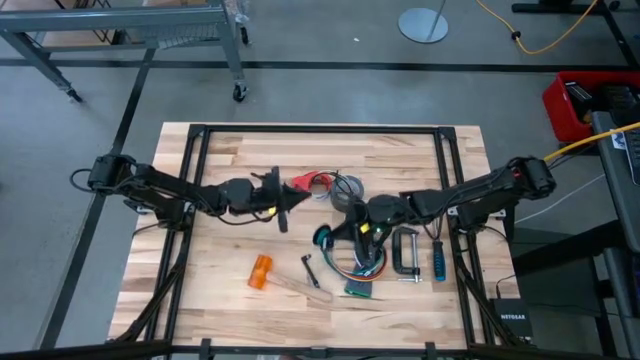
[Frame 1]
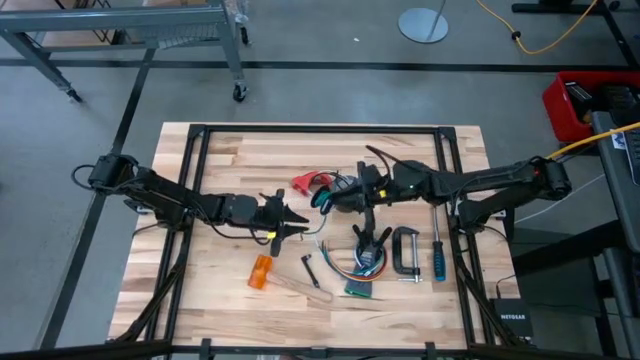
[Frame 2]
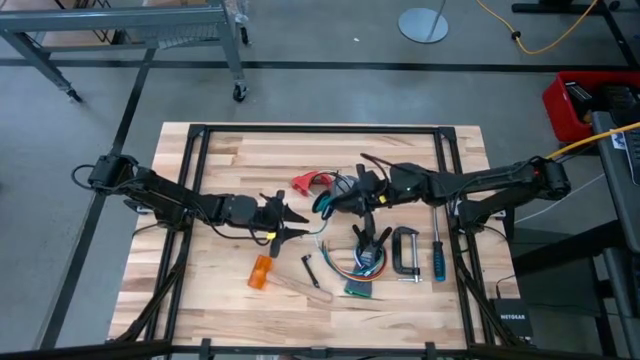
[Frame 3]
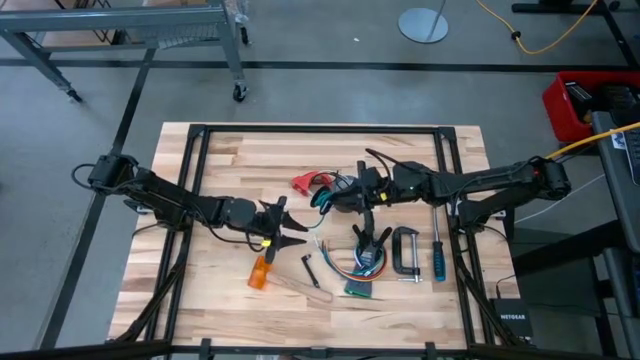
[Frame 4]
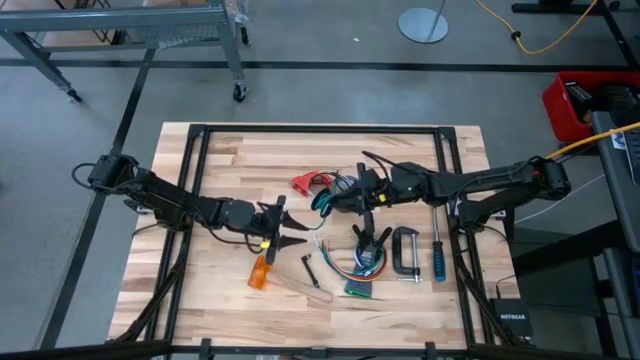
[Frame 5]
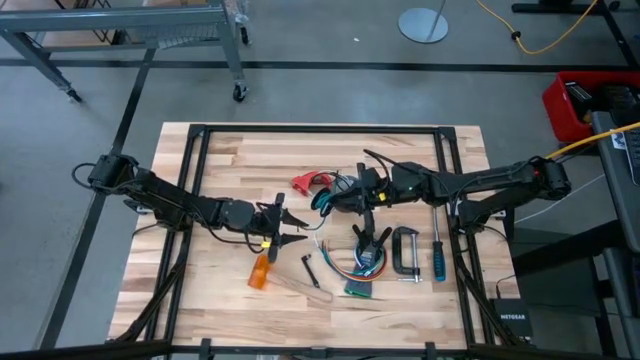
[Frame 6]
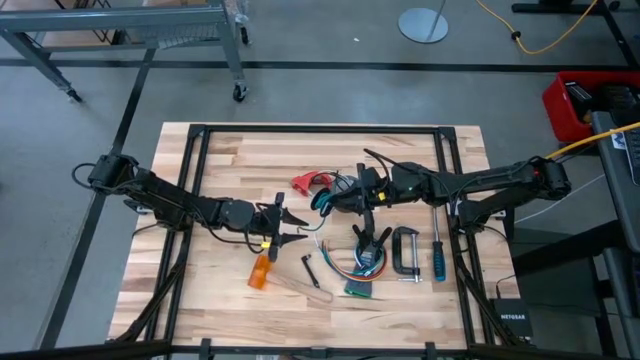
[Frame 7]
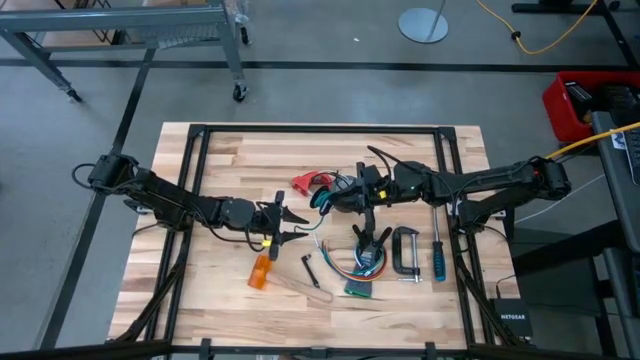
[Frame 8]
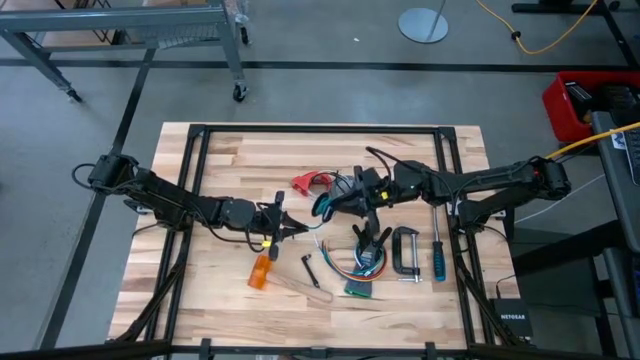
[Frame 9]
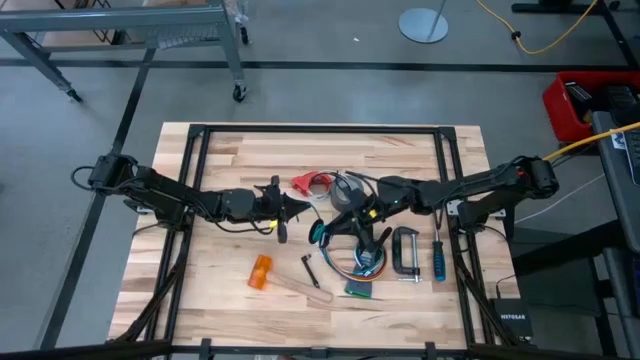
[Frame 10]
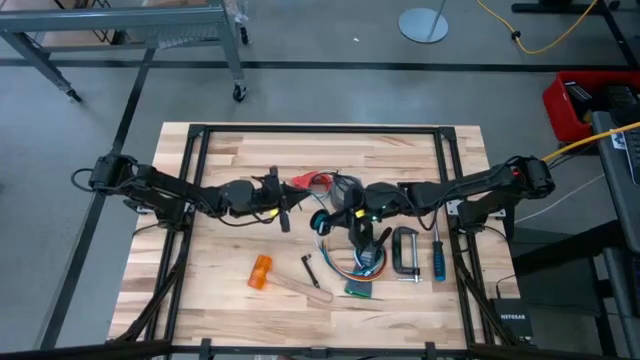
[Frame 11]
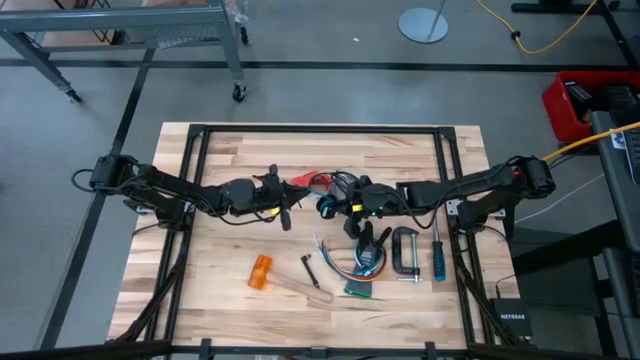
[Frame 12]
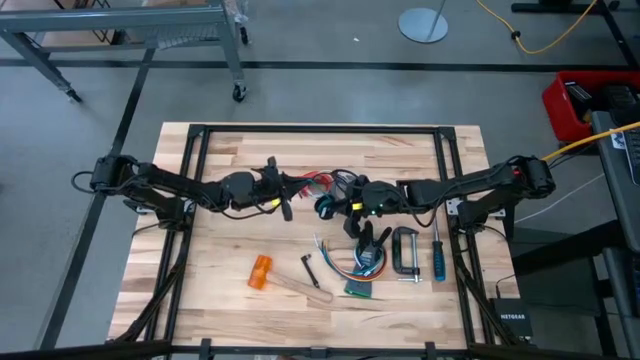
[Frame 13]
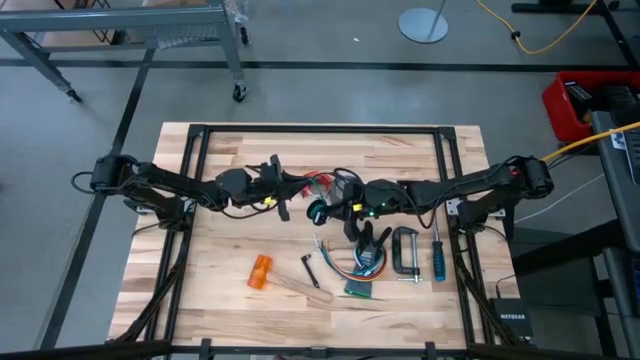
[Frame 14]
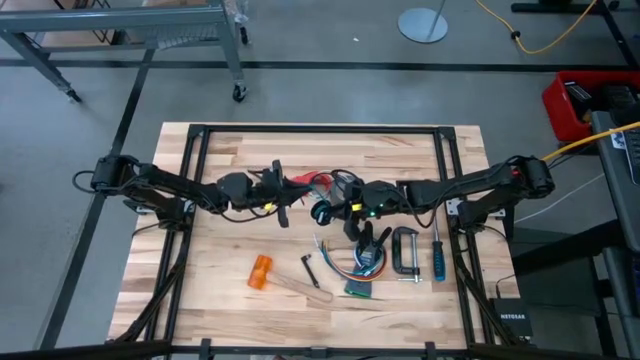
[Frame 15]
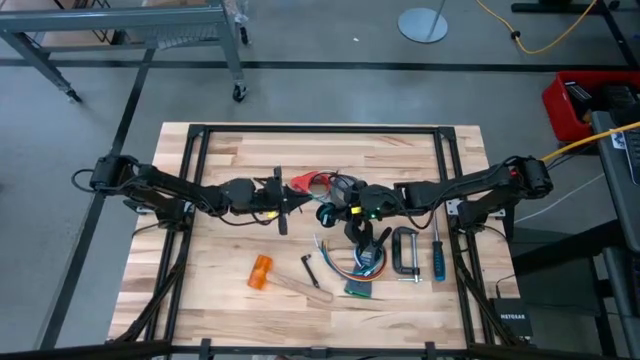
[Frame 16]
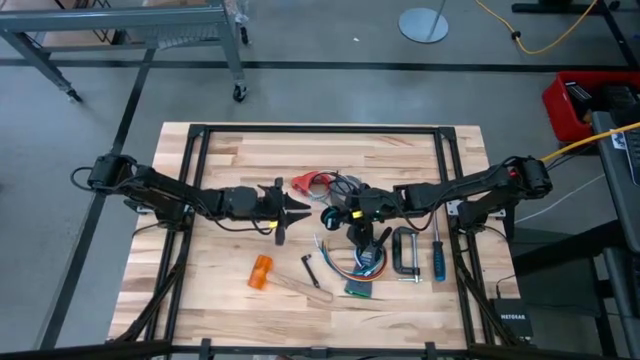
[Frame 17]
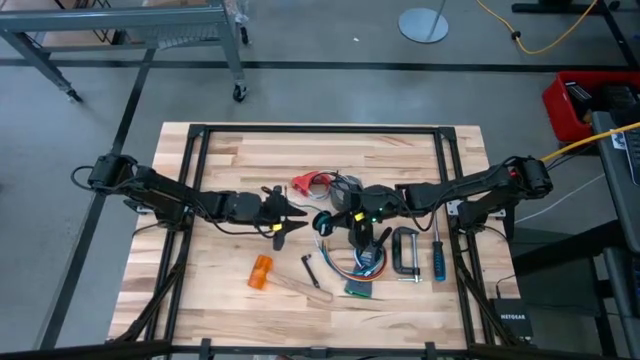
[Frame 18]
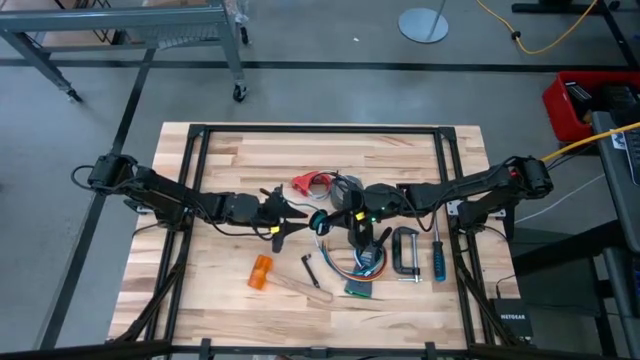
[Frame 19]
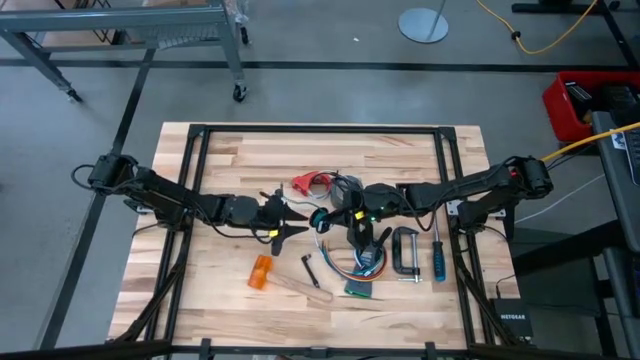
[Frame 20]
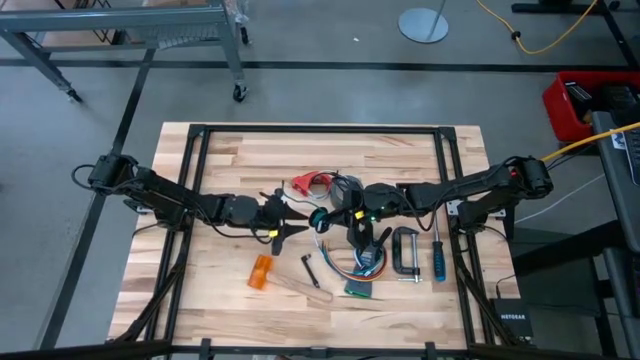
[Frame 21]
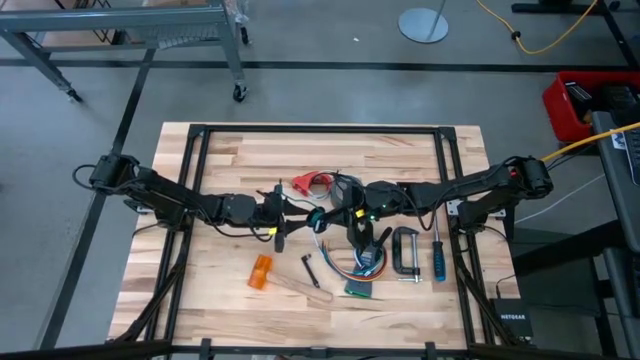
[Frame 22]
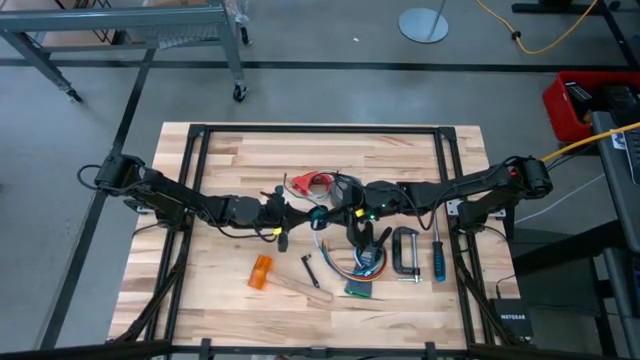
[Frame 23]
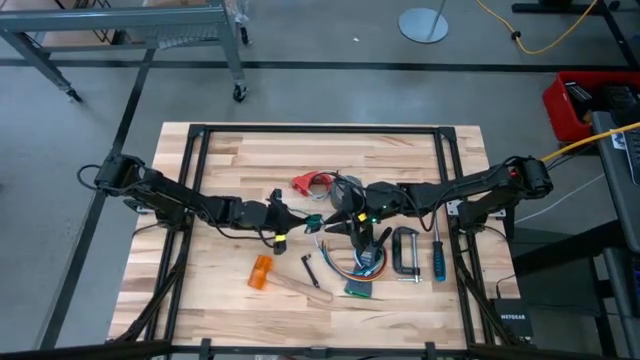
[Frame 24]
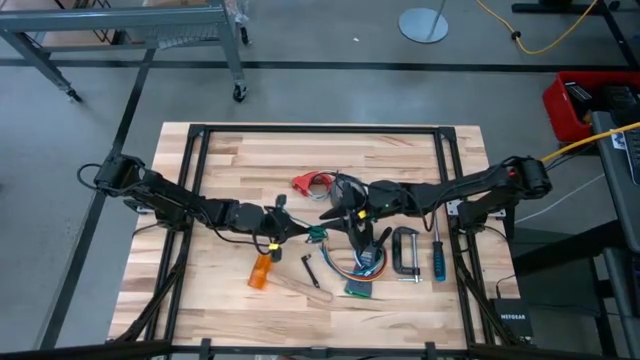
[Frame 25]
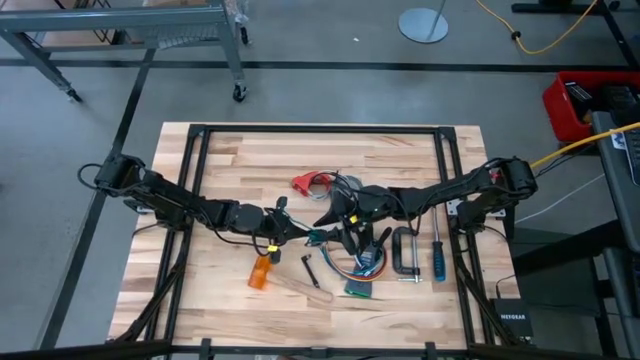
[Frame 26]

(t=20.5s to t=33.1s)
Task: Coil cords
Uncoil the blue wire from the spool

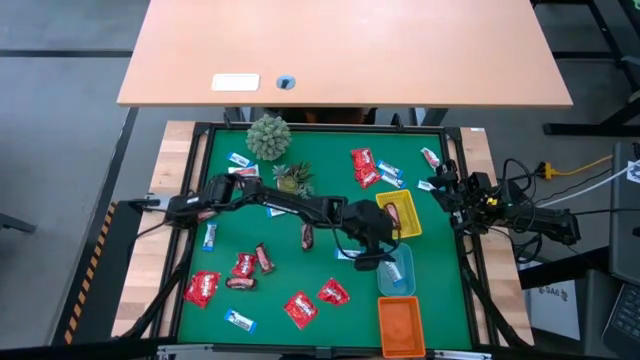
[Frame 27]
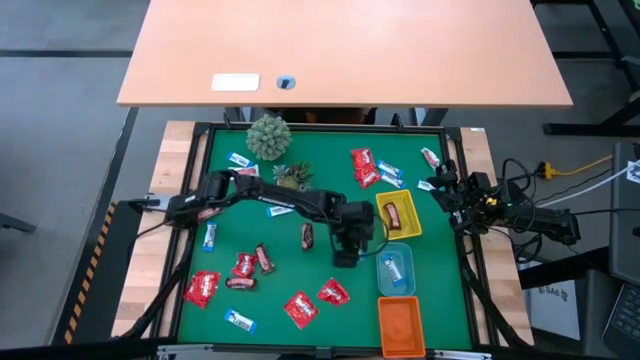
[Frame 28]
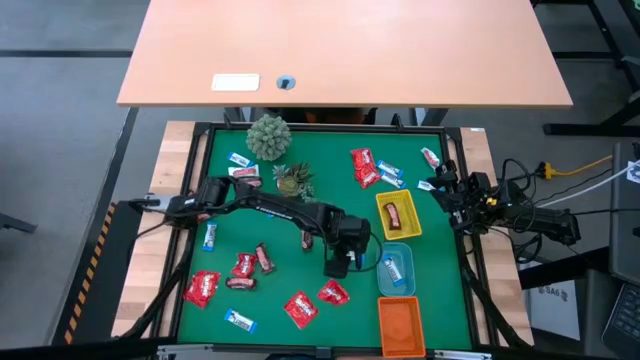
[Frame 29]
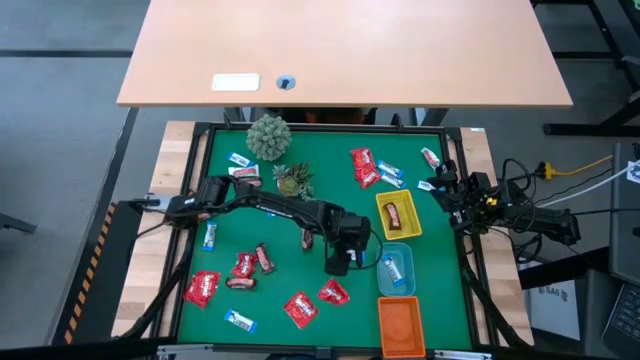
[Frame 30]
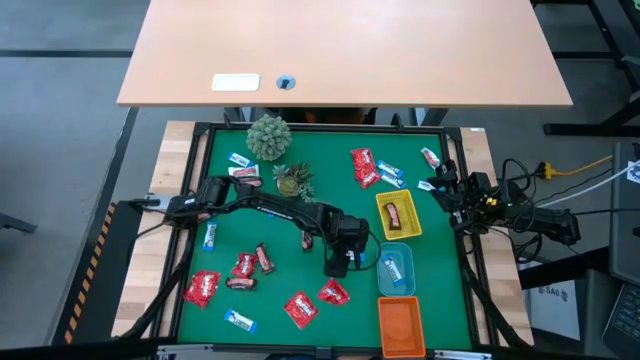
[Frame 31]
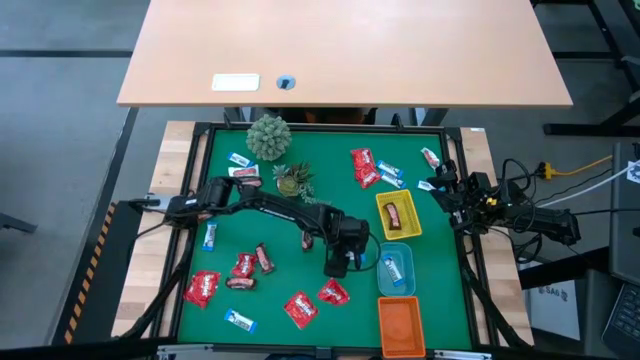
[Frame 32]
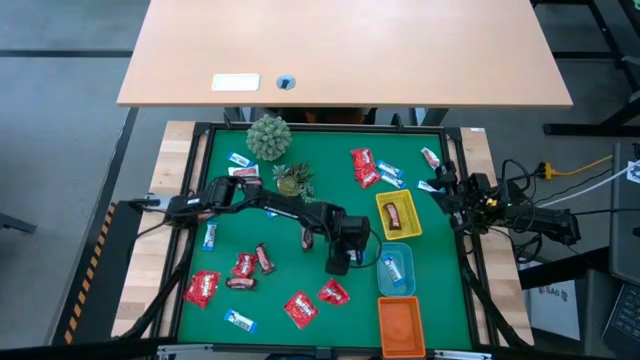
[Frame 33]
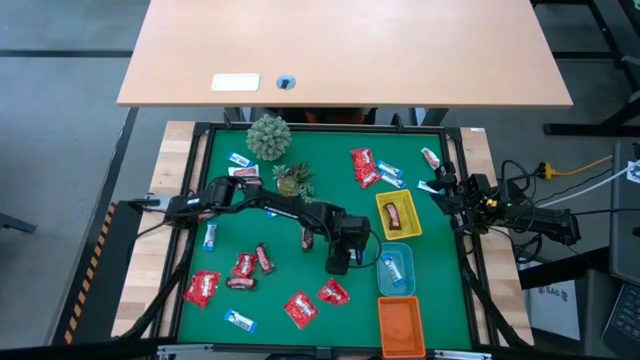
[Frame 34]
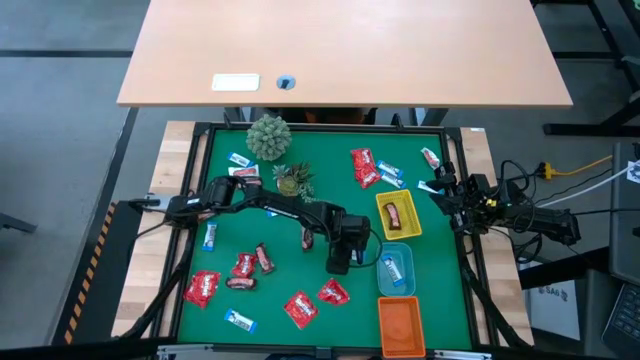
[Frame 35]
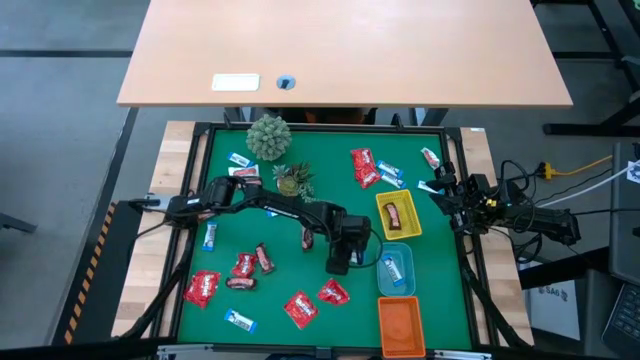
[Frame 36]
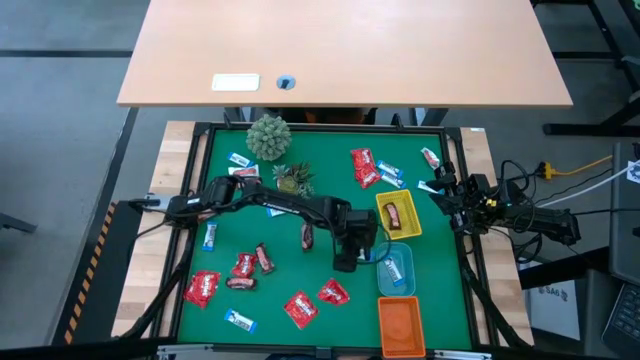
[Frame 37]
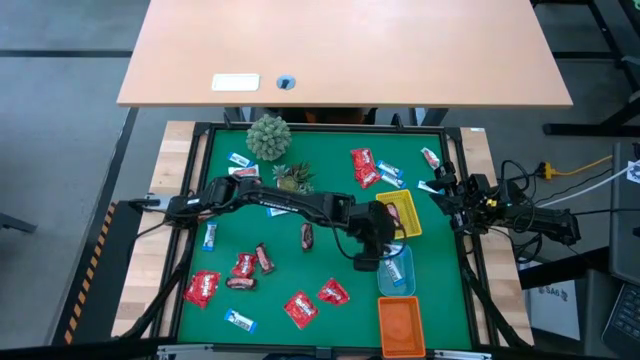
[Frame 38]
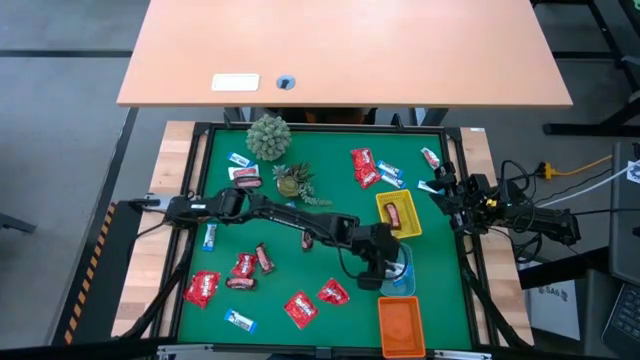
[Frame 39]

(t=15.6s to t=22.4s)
Task: Sort candy
Put the white chocolate into the blue bin
